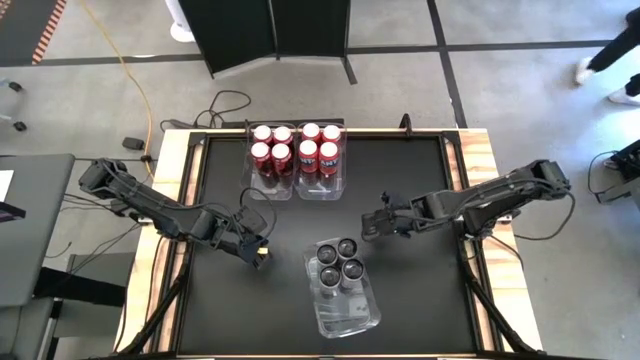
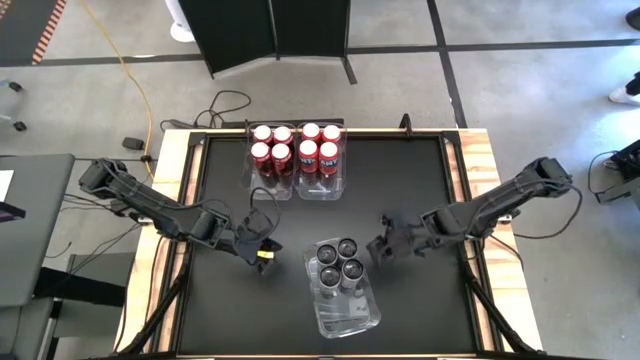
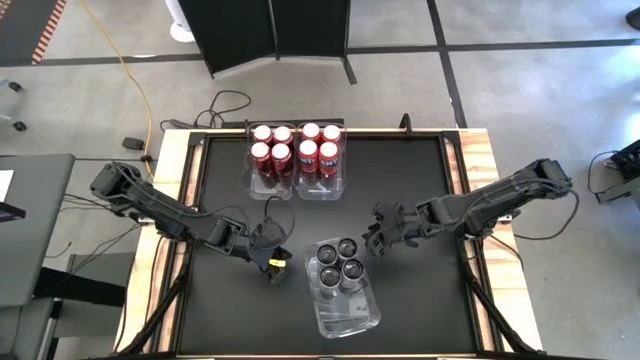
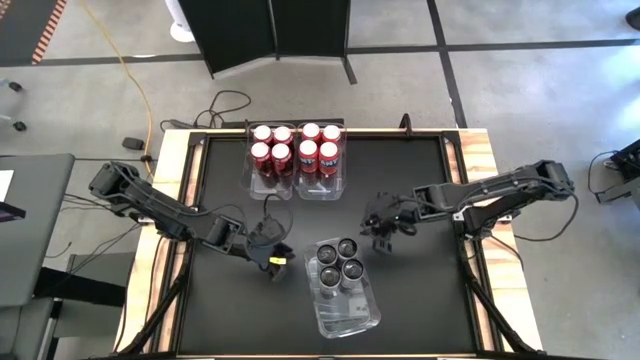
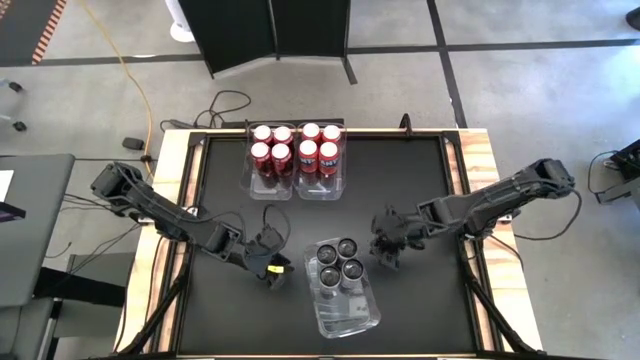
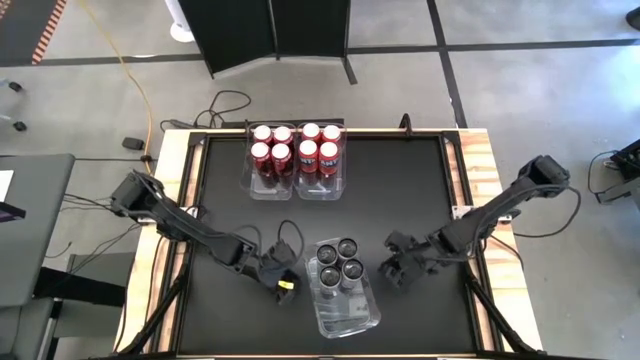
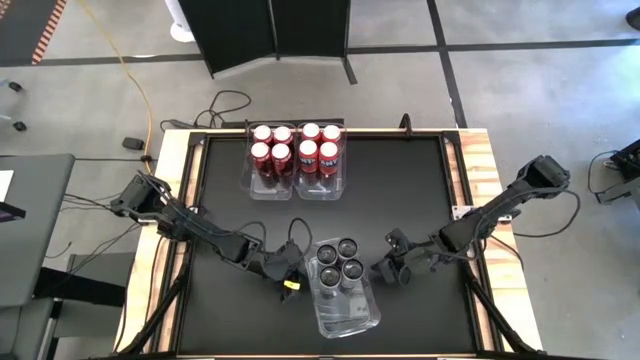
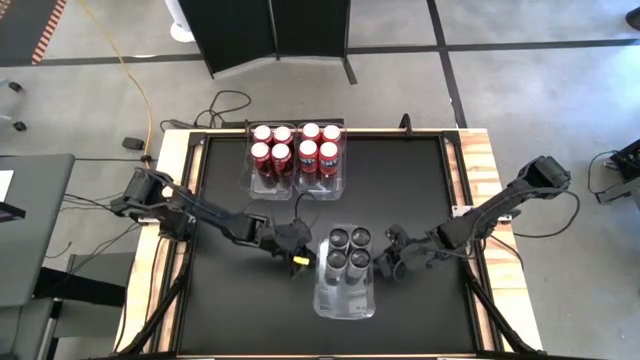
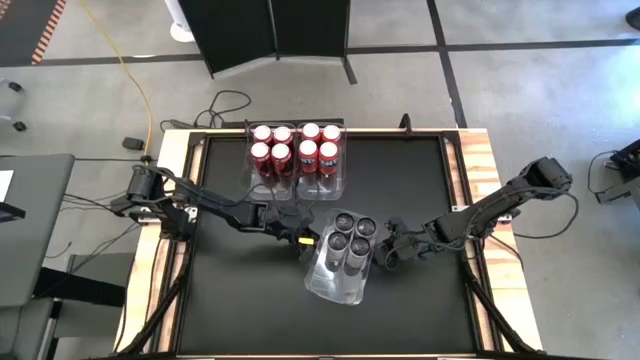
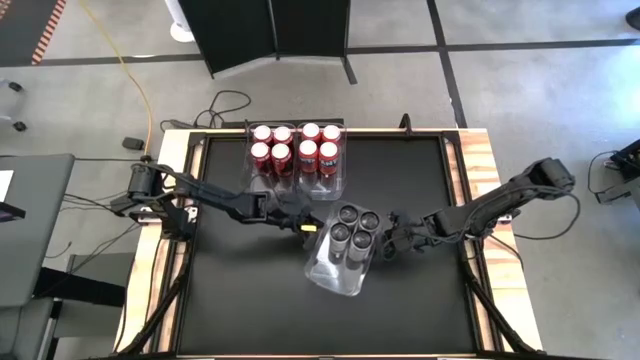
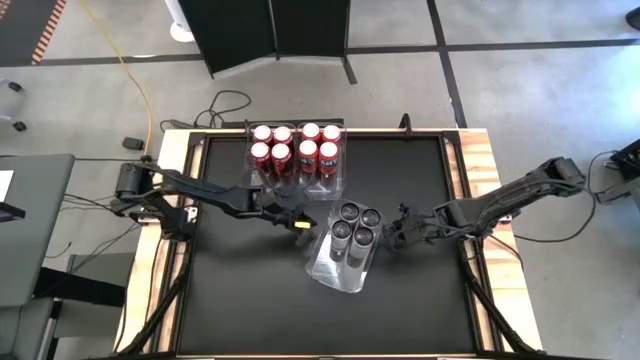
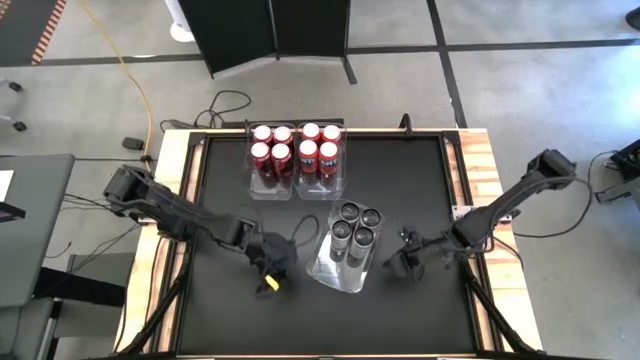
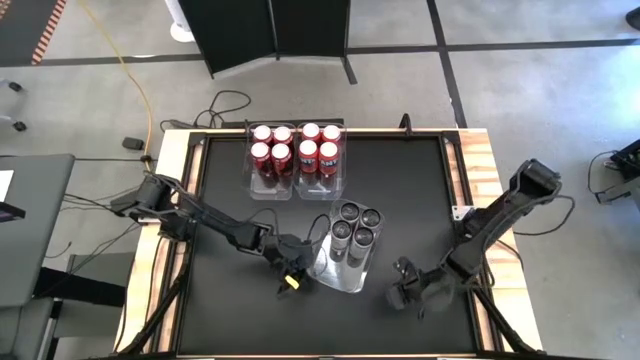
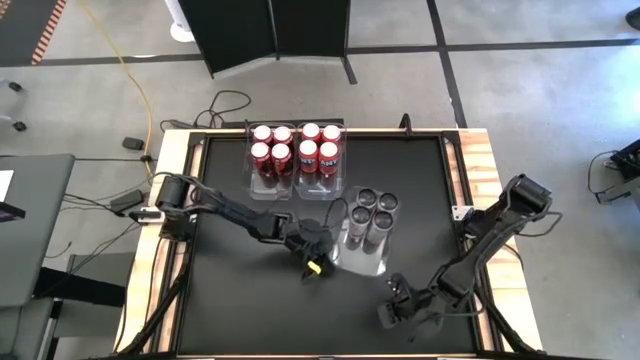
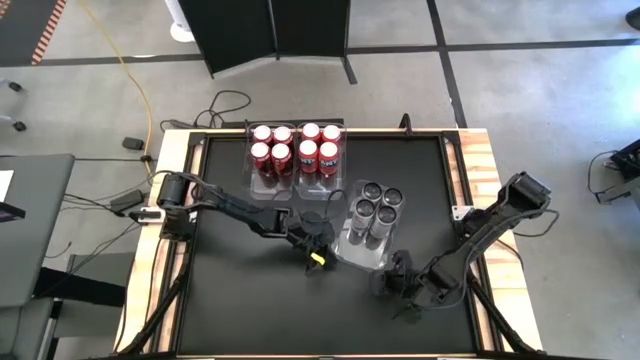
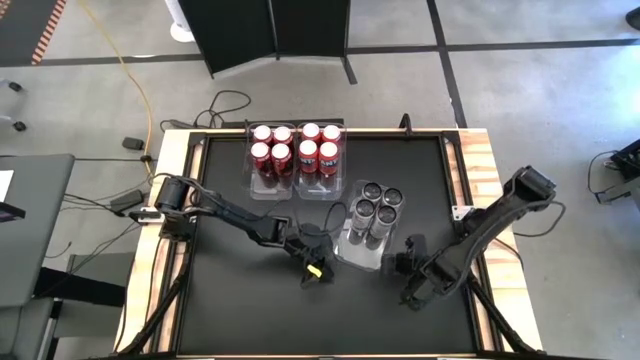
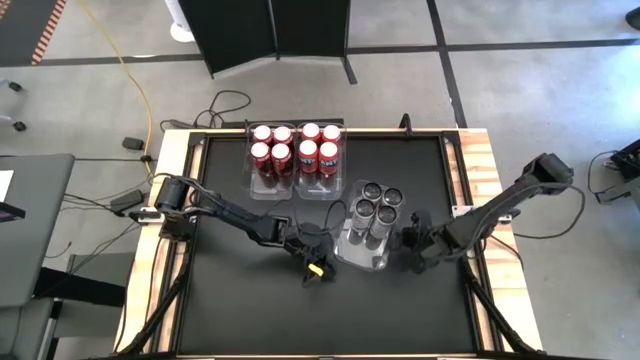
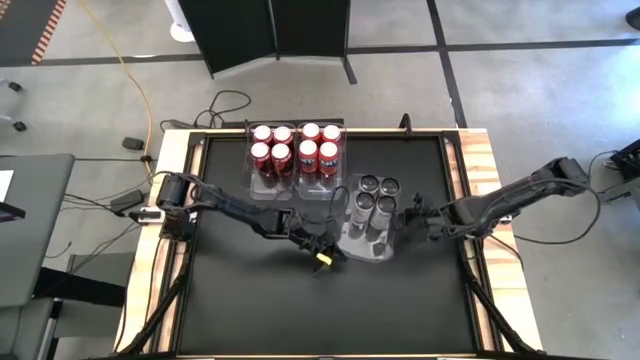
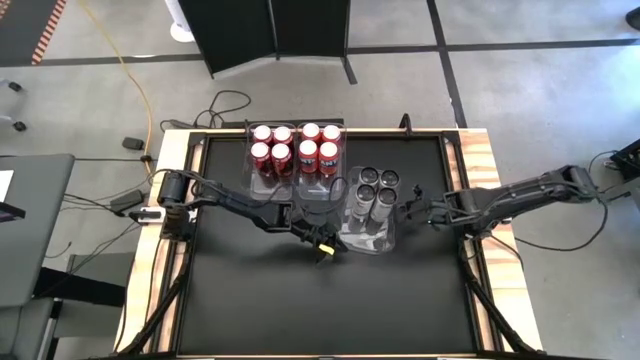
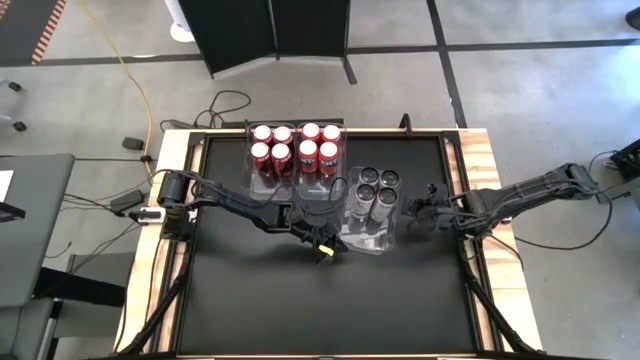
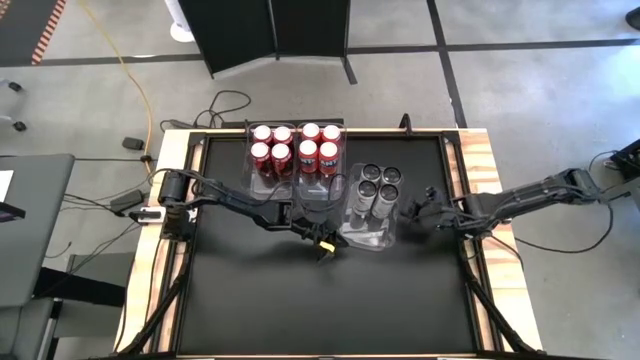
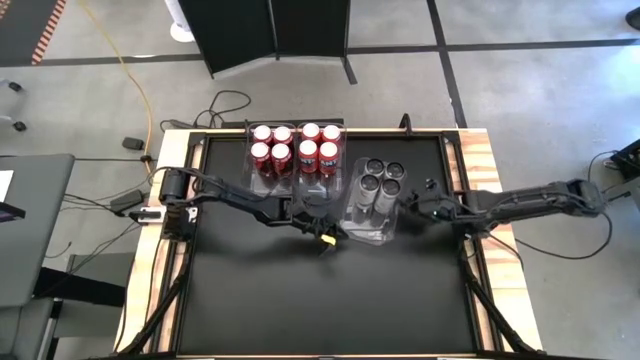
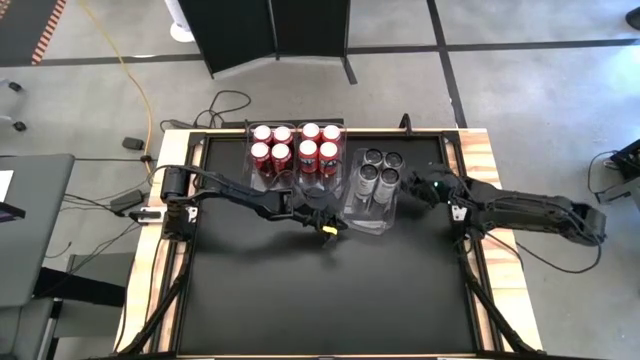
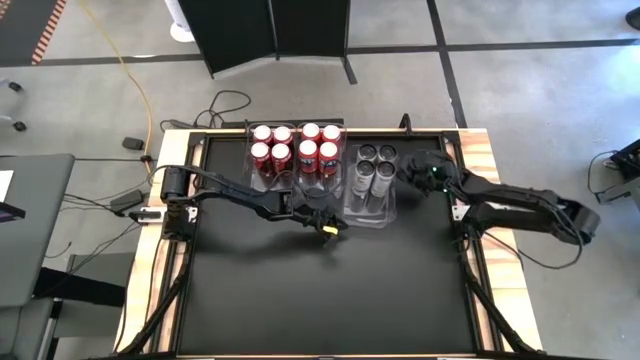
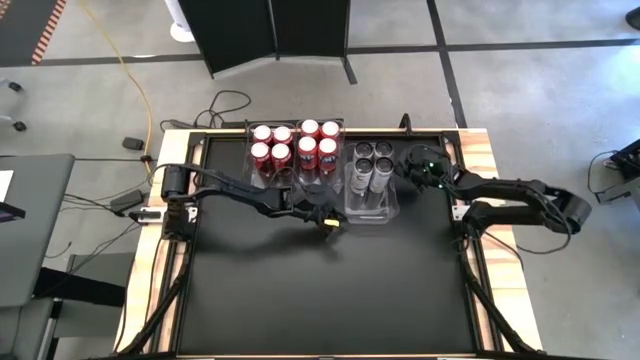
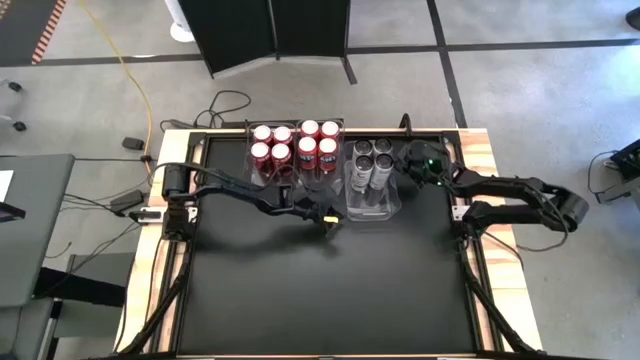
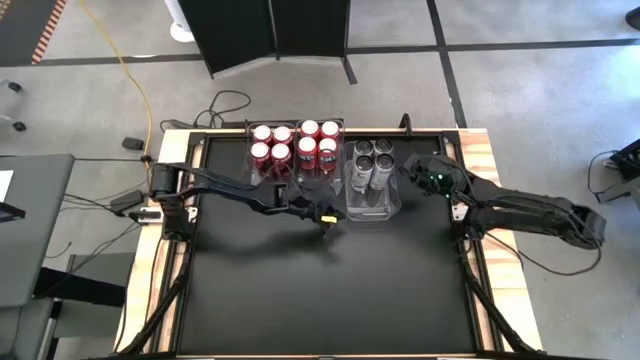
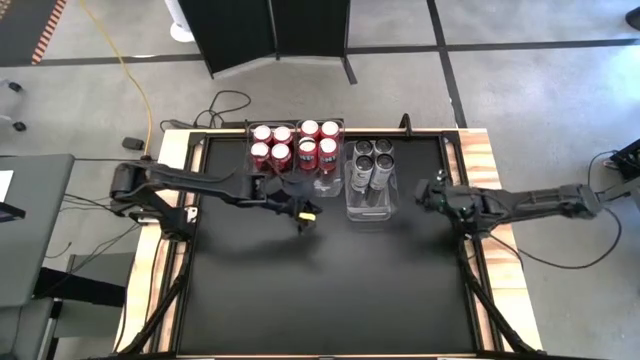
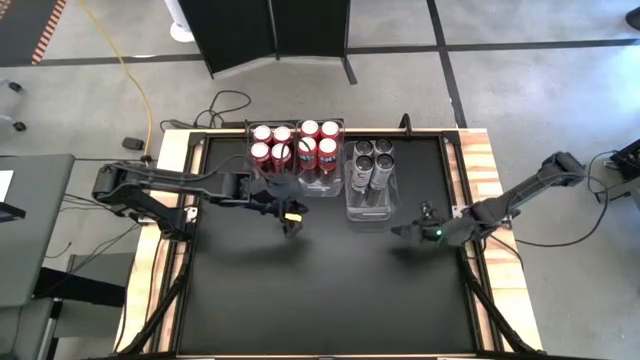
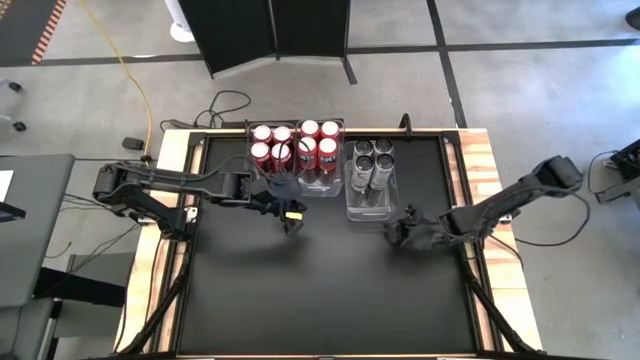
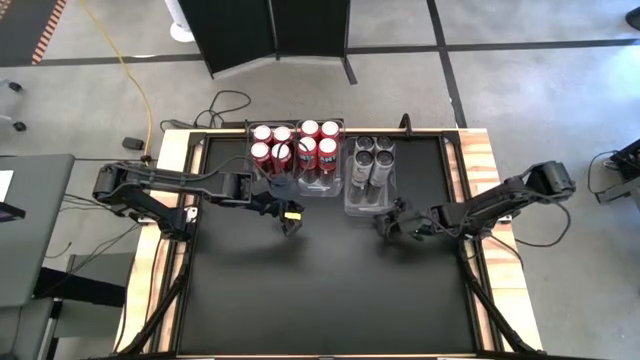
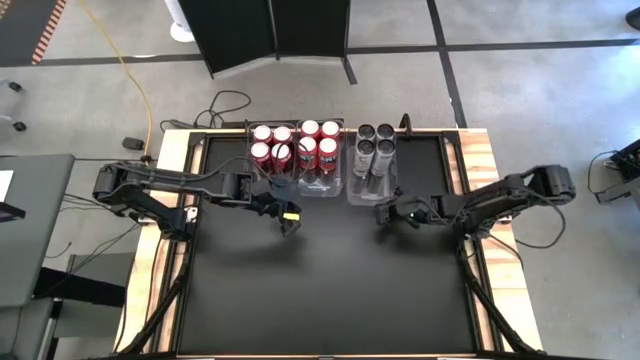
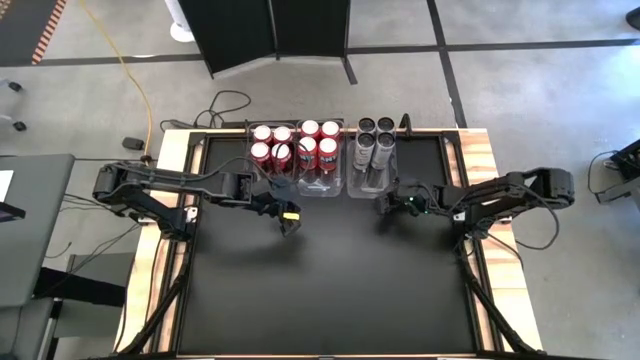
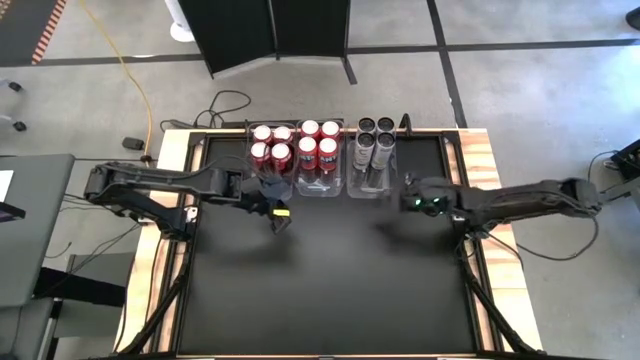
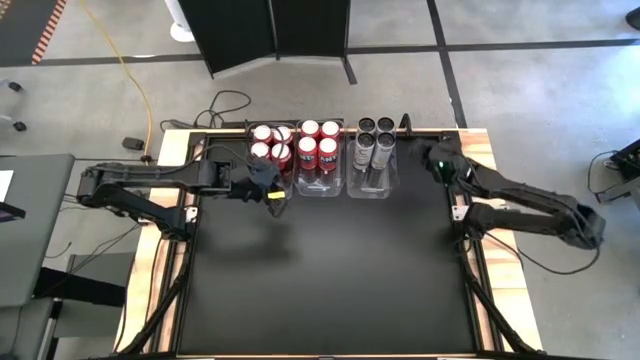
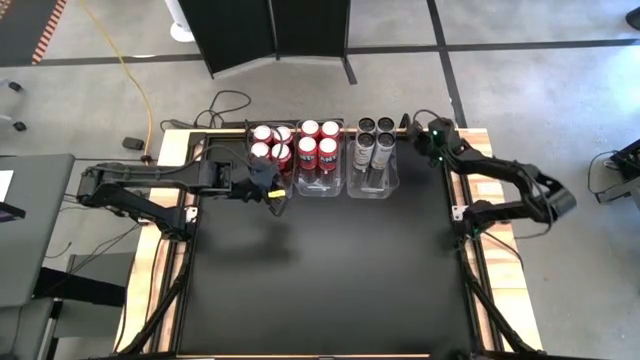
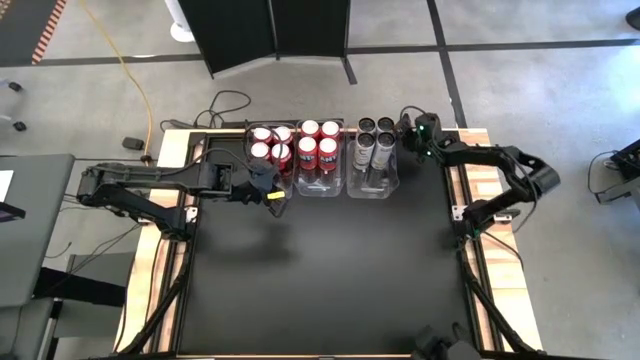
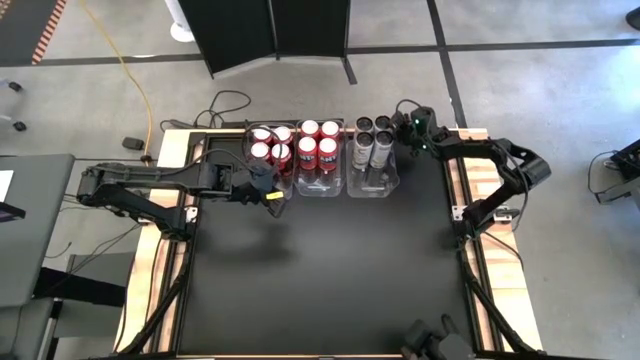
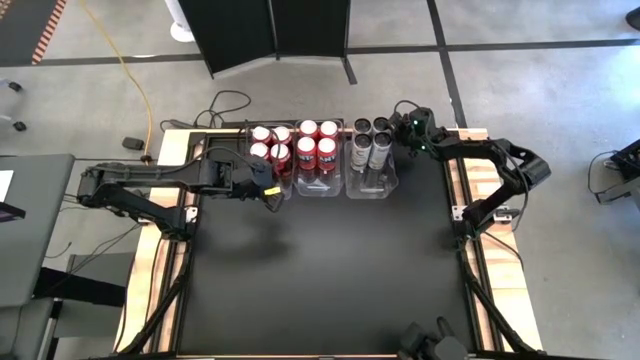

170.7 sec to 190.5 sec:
Task: Sort soda cans
Move the bottom transparent bin to the top right of the table

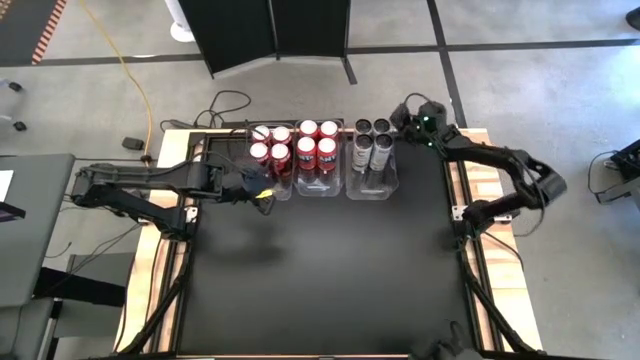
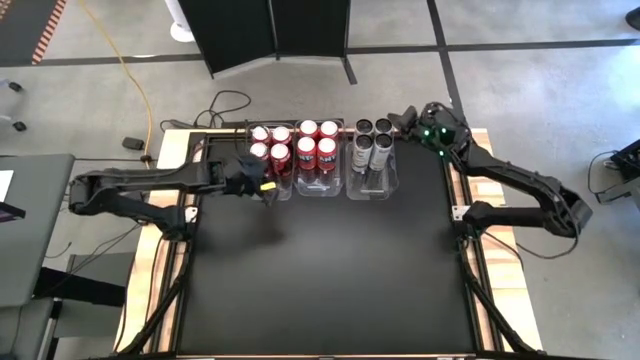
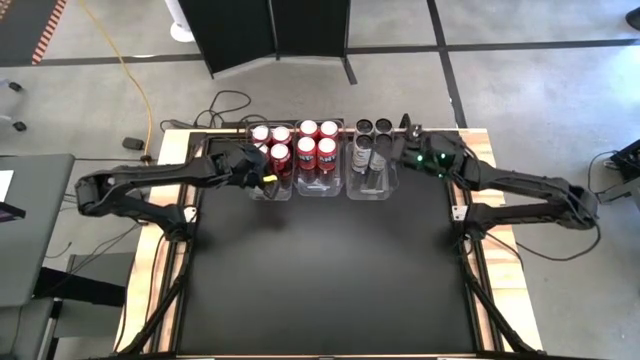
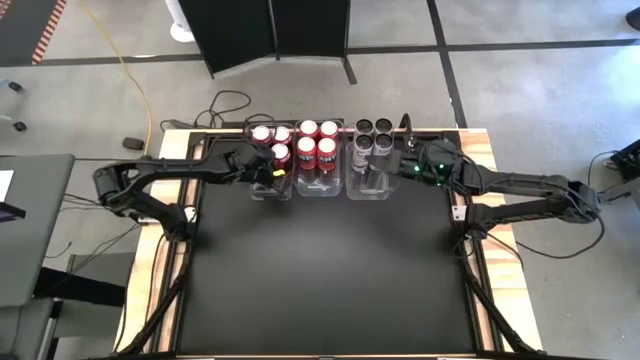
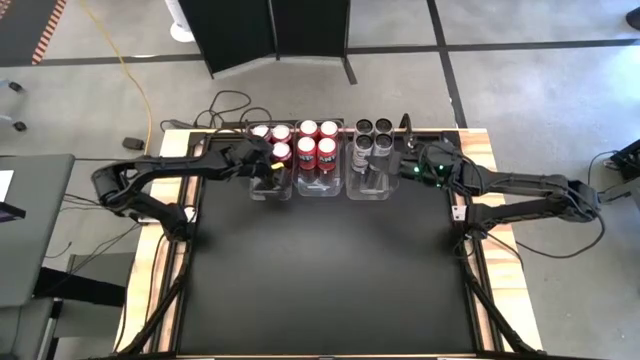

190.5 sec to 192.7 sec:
Adjust the red white soda can
